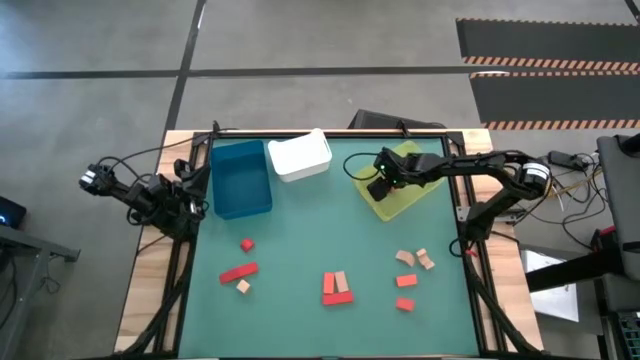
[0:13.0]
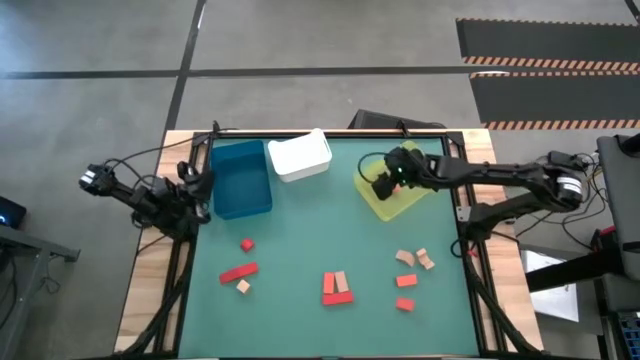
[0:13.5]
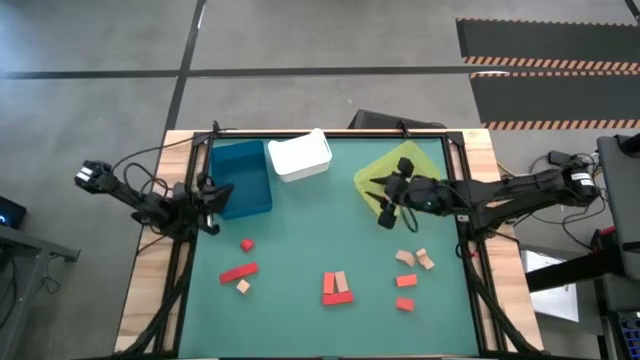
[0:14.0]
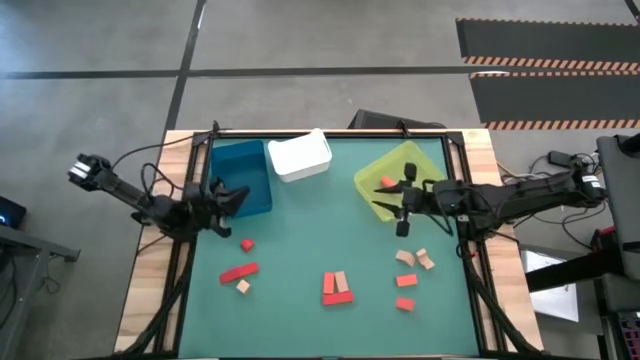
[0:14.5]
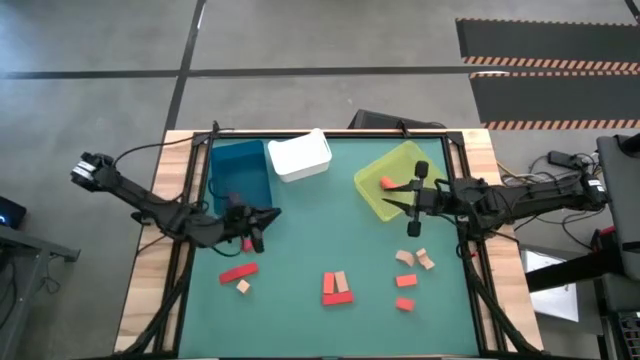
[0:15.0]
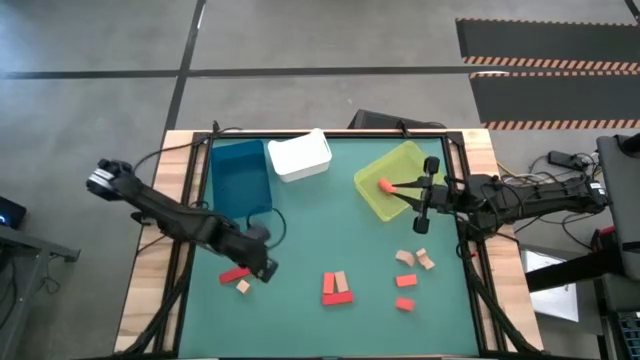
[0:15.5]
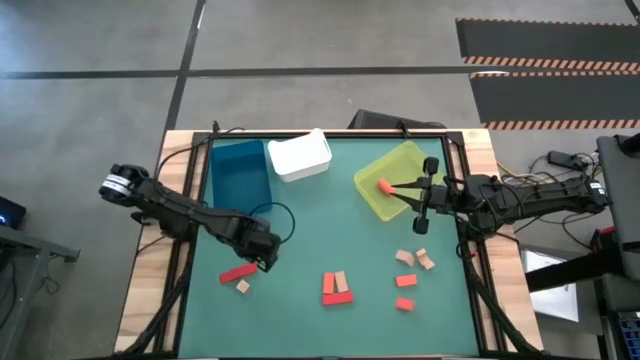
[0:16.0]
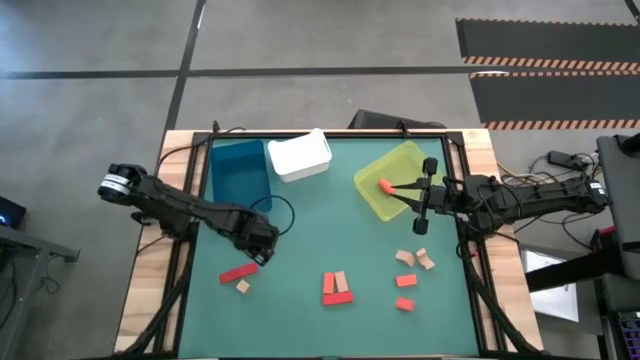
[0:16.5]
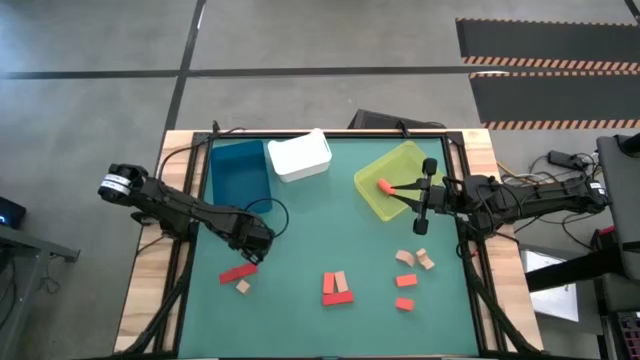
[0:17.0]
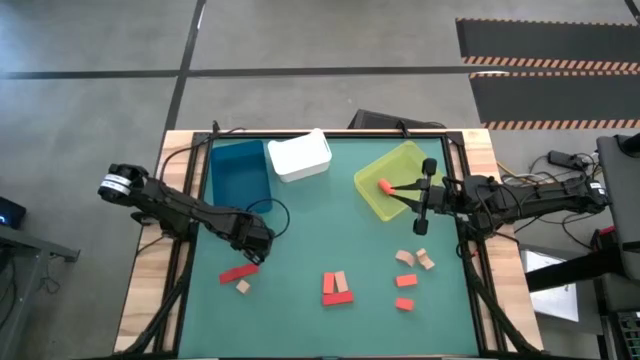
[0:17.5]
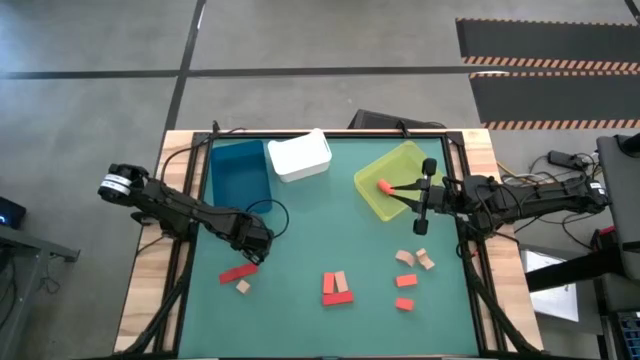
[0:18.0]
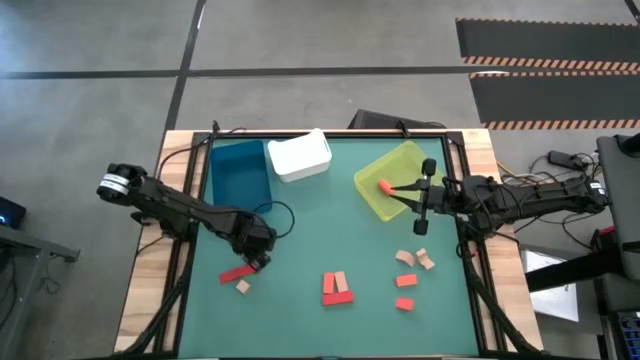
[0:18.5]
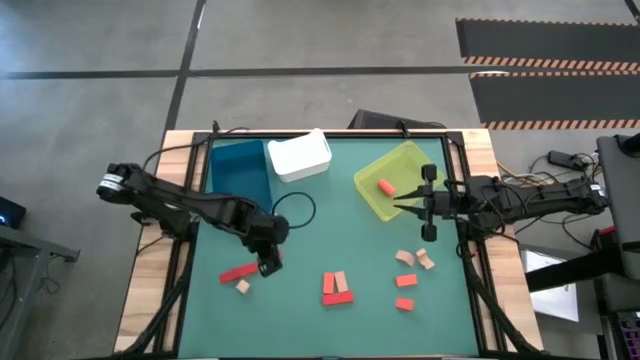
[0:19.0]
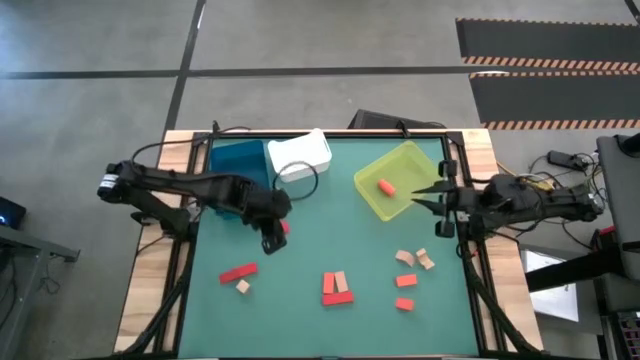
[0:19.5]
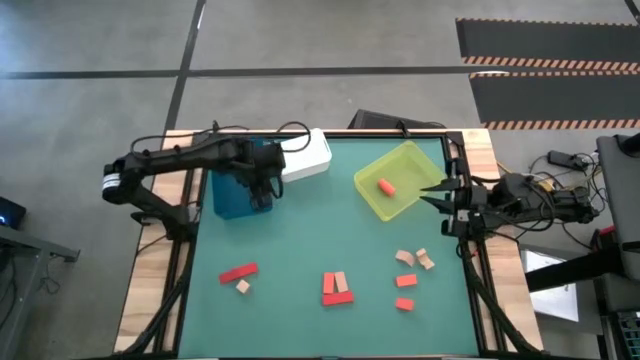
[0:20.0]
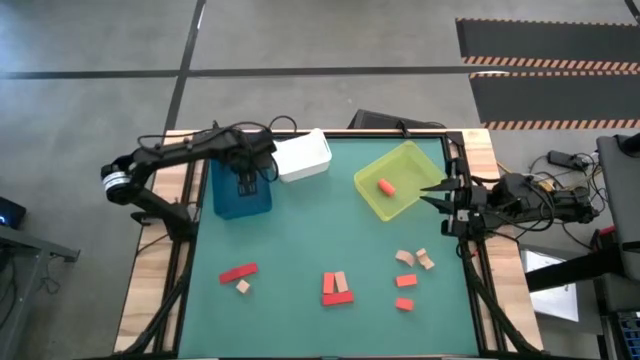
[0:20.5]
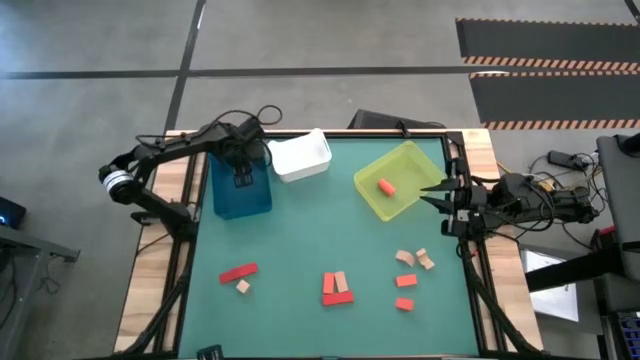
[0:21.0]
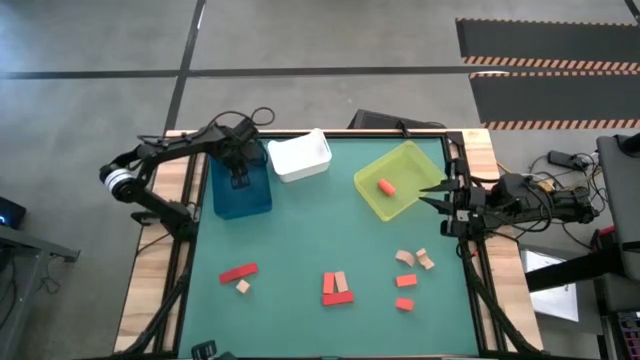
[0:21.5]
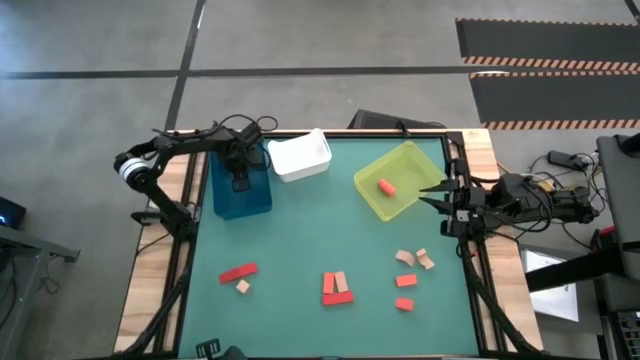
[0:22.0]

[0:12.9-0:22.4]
Task: Sort & place blocks by color
Put the red block into the blue bin

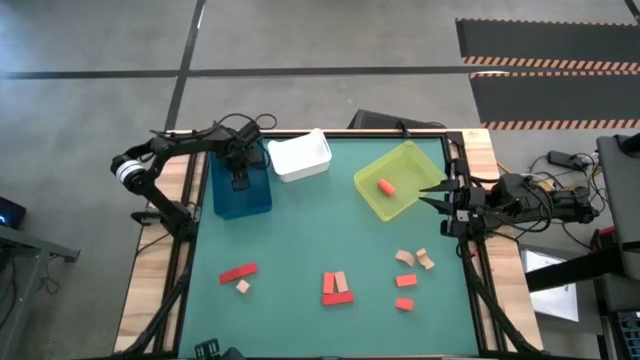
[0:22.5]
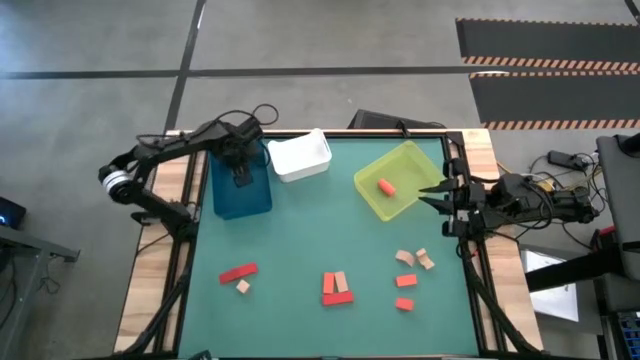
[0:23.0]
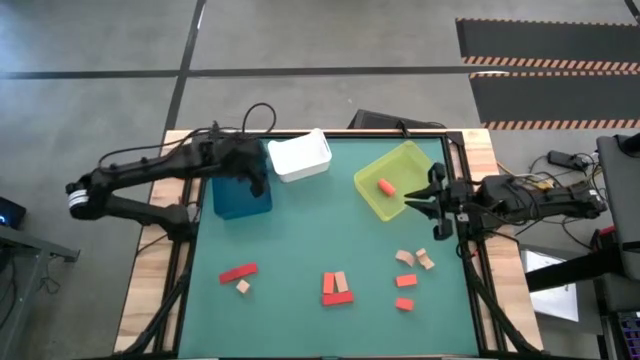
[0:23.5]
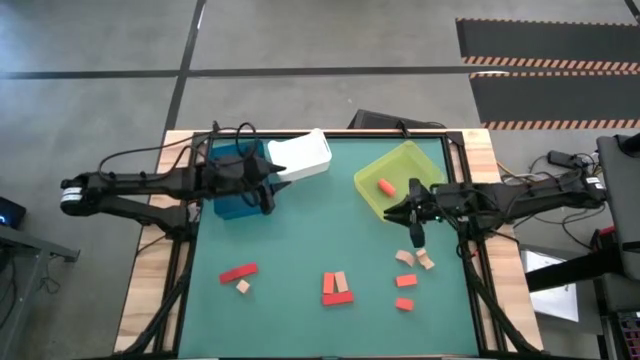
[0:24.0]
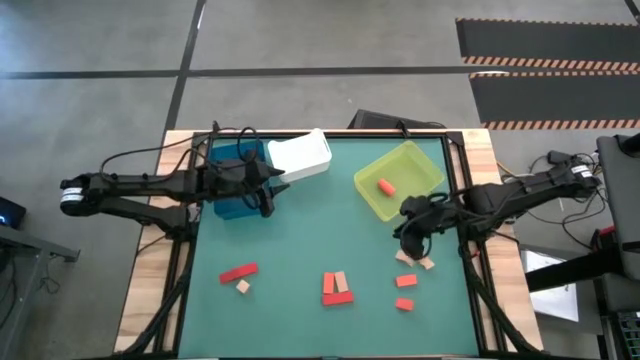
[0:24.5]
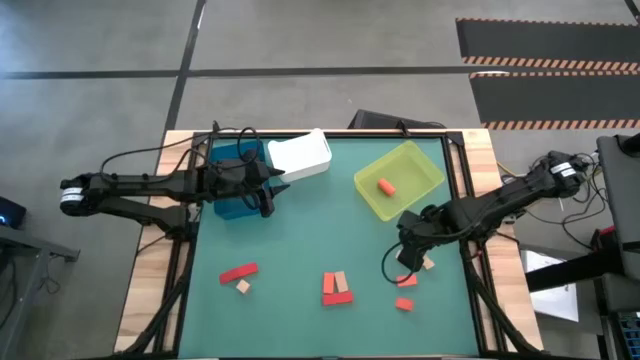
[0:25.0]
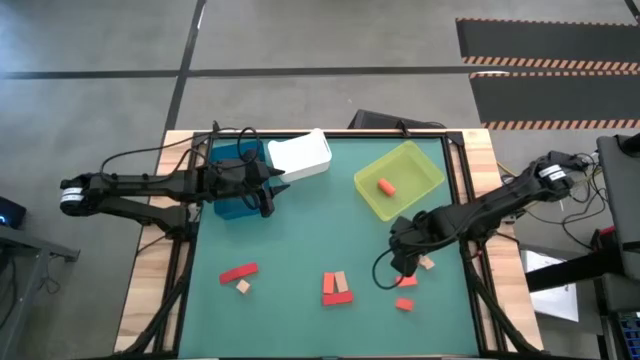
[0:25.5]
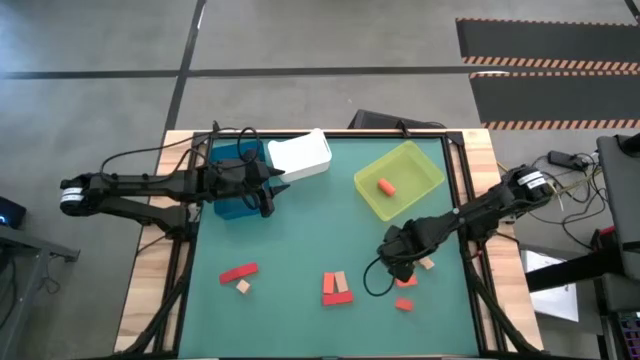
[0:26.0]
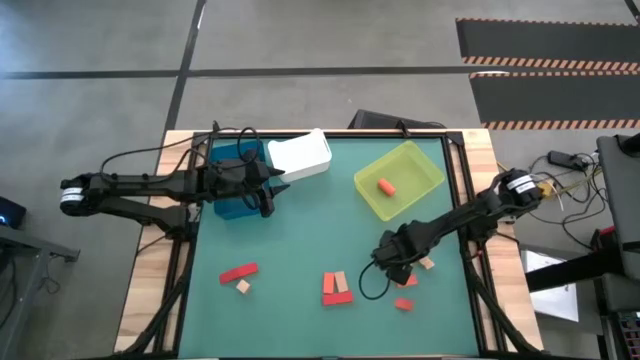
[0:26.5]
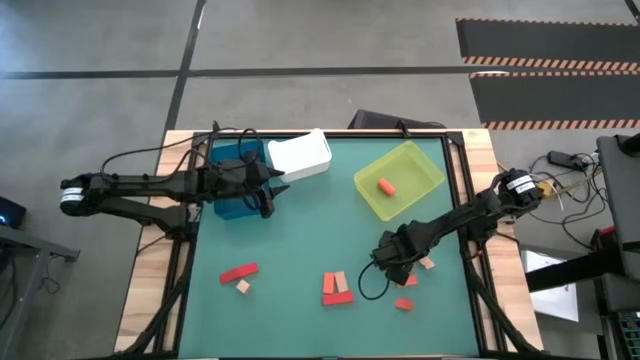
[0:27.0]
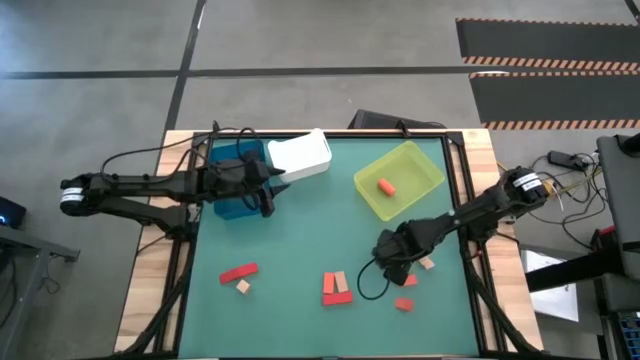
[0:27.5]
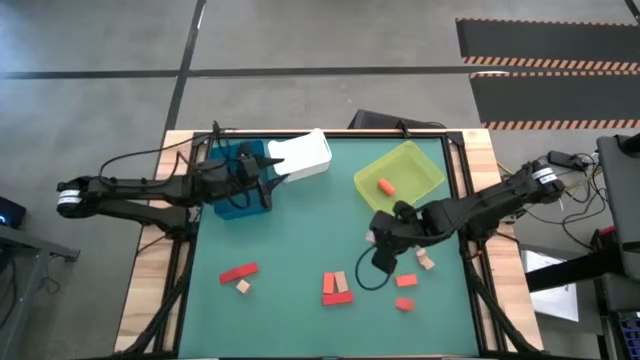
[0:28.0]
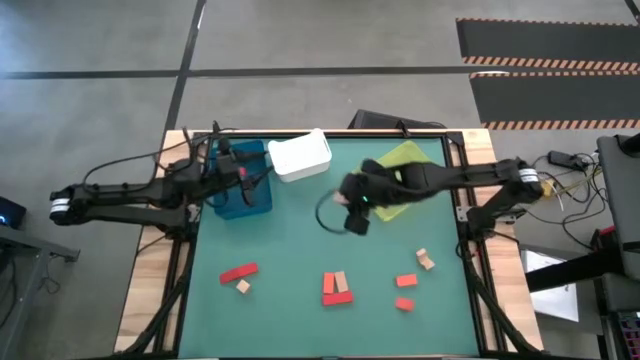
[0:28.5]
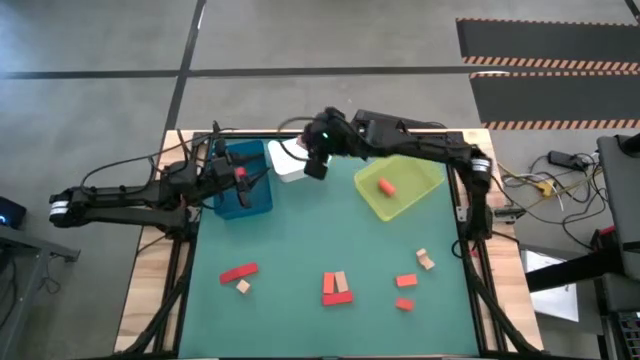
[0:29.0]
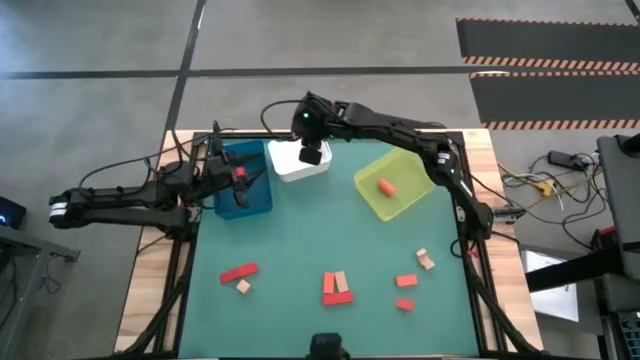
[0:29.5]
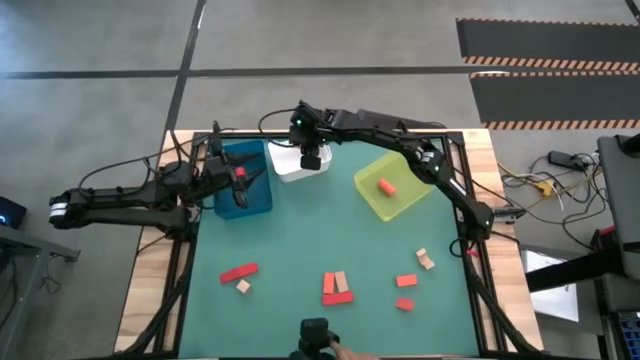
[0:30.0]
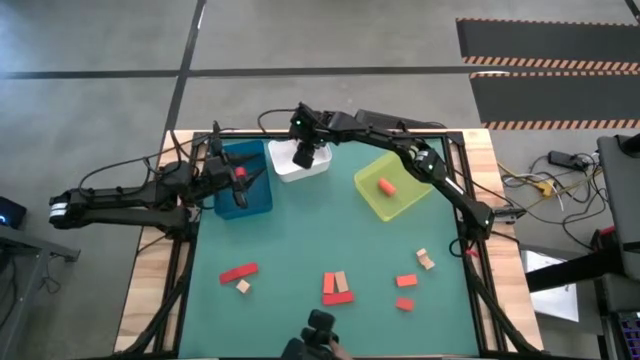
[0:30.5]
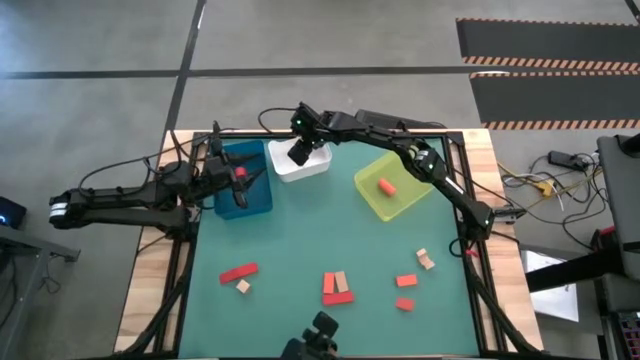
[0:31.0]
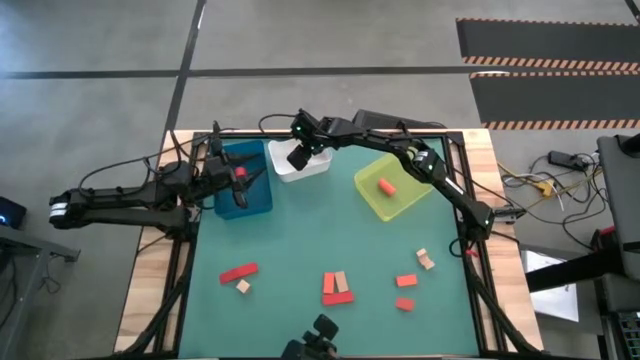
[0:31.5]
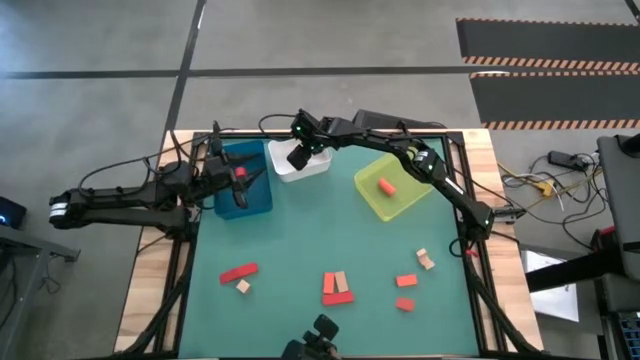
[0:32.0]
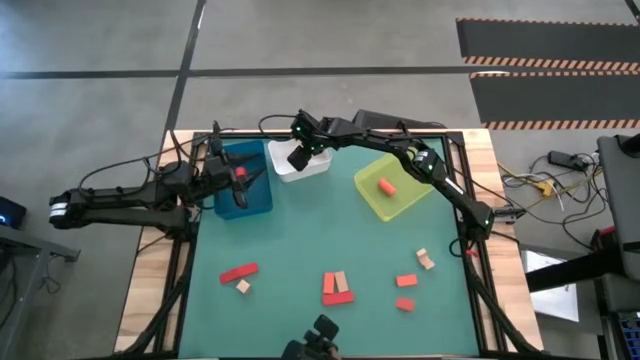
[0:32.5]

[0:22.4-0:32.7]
Put the brown block into the white bin
